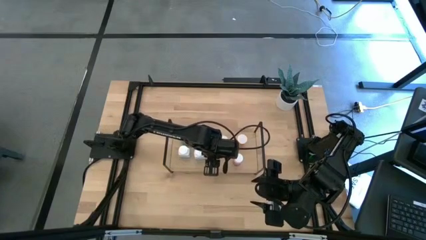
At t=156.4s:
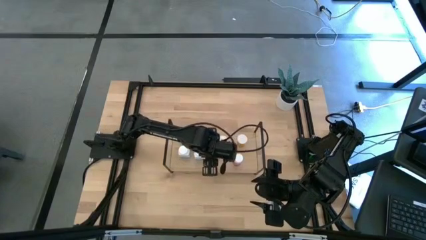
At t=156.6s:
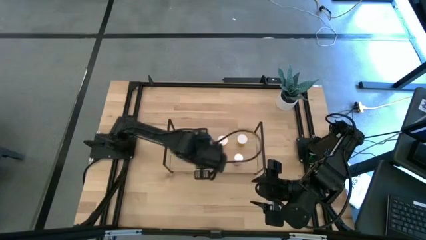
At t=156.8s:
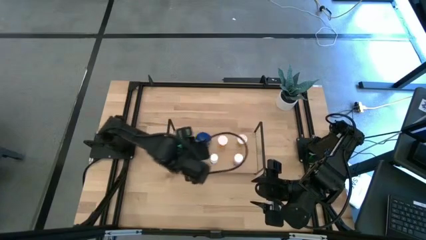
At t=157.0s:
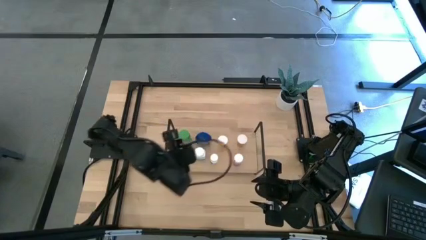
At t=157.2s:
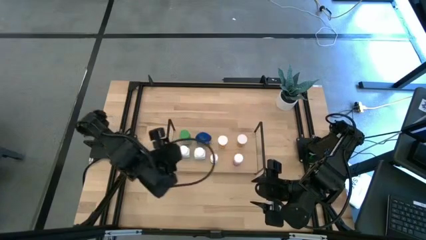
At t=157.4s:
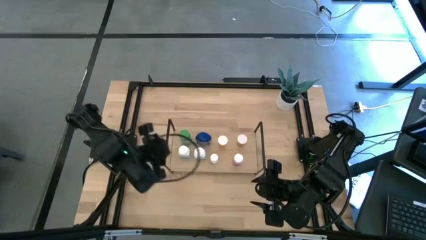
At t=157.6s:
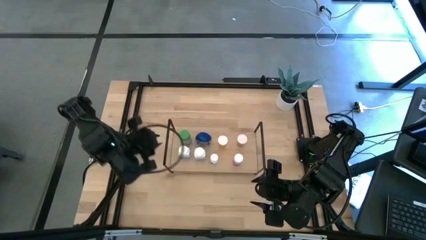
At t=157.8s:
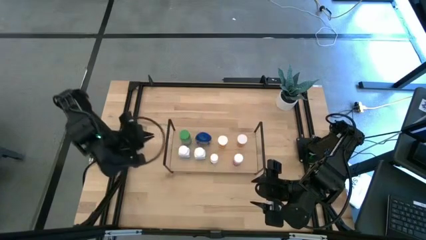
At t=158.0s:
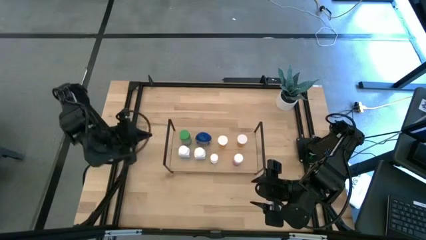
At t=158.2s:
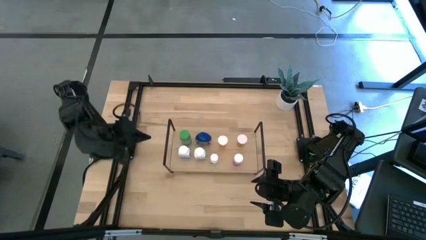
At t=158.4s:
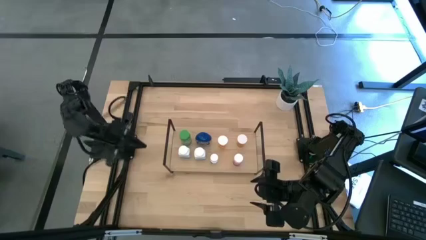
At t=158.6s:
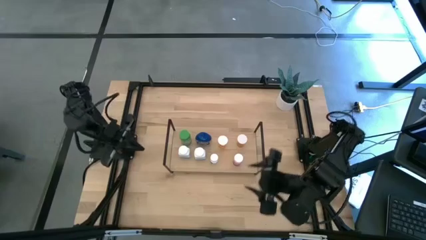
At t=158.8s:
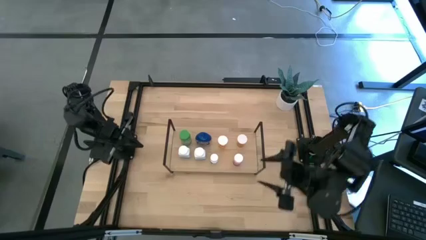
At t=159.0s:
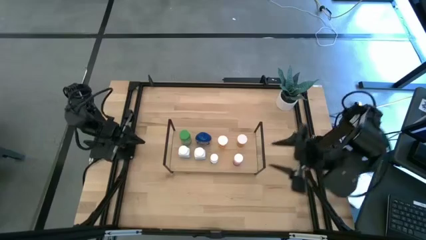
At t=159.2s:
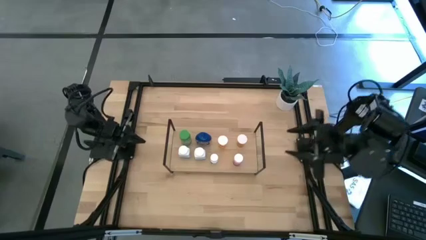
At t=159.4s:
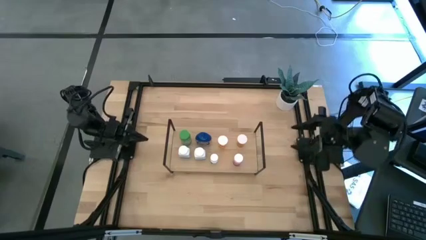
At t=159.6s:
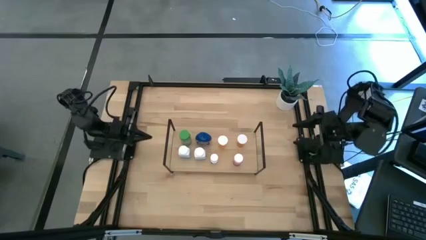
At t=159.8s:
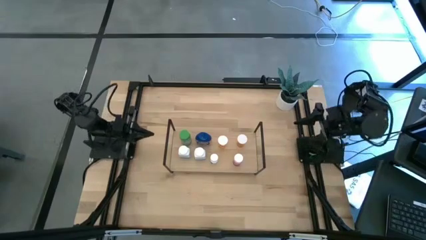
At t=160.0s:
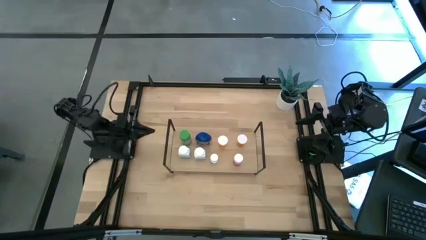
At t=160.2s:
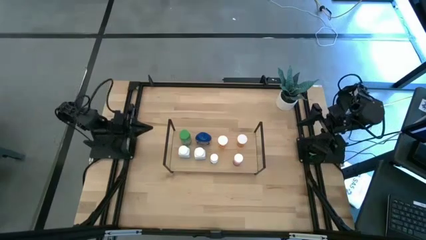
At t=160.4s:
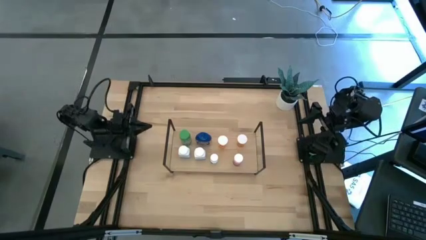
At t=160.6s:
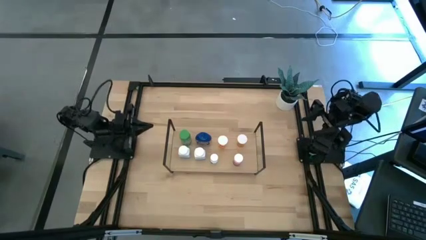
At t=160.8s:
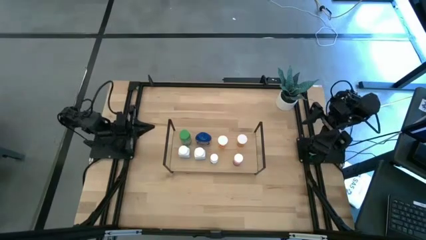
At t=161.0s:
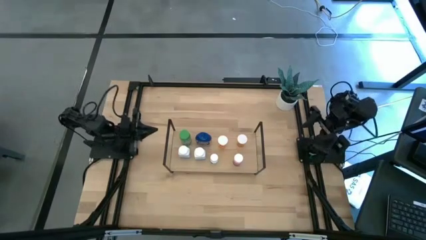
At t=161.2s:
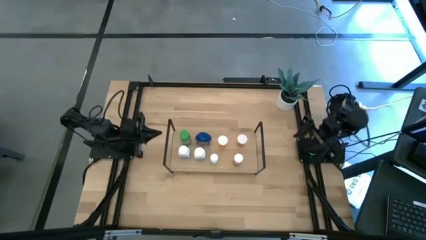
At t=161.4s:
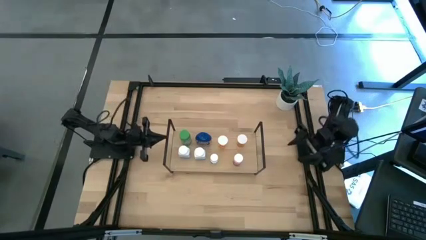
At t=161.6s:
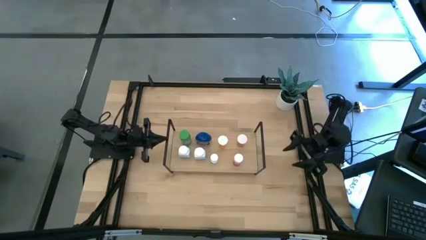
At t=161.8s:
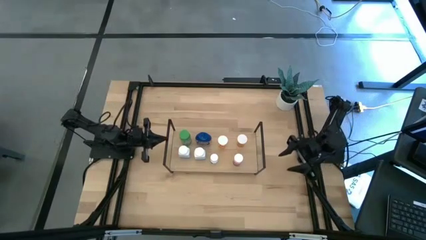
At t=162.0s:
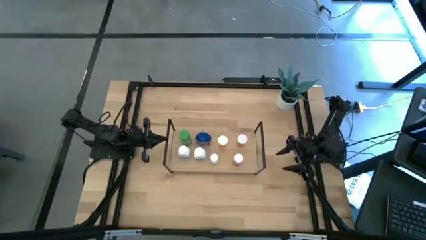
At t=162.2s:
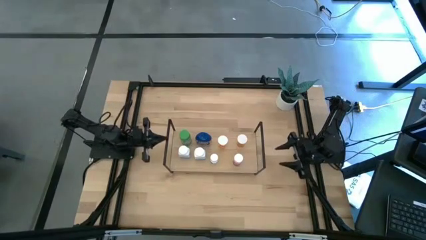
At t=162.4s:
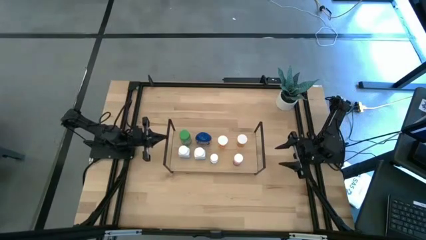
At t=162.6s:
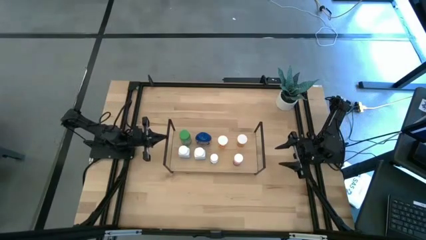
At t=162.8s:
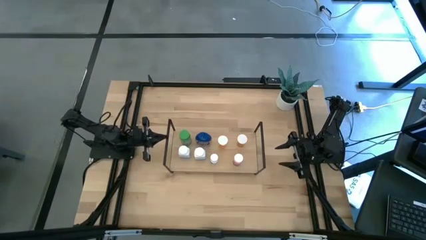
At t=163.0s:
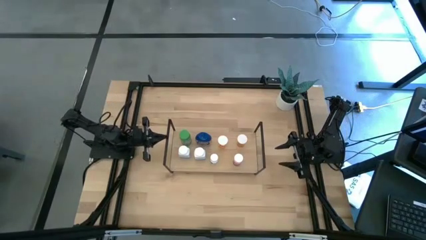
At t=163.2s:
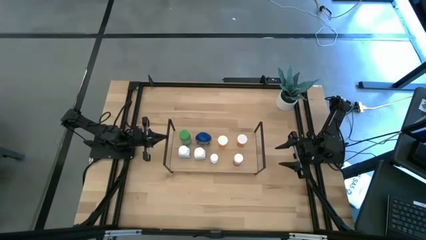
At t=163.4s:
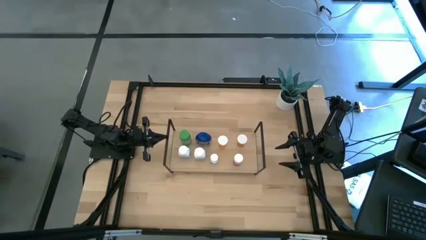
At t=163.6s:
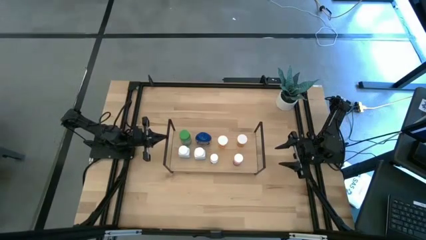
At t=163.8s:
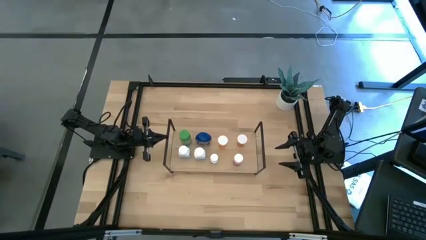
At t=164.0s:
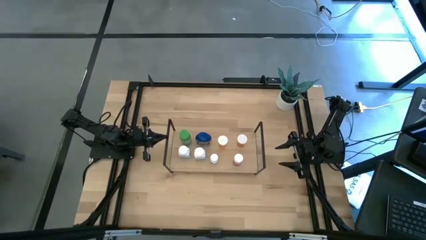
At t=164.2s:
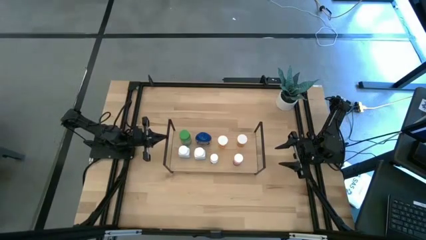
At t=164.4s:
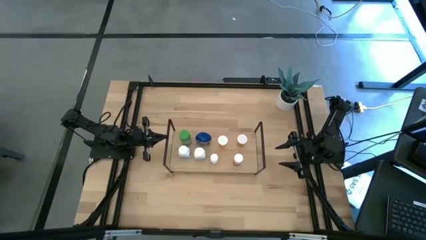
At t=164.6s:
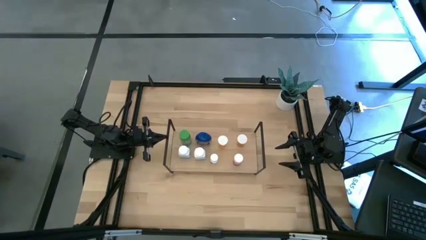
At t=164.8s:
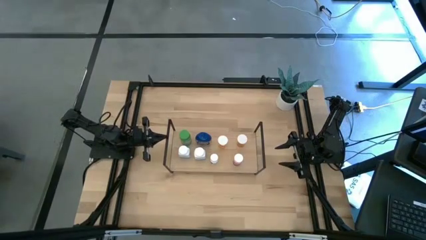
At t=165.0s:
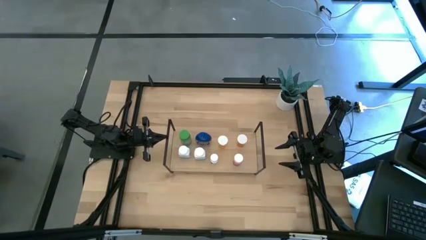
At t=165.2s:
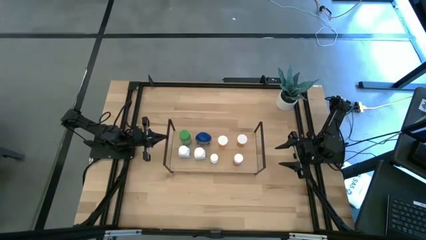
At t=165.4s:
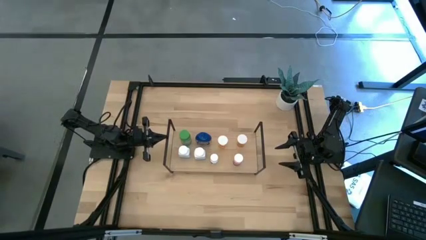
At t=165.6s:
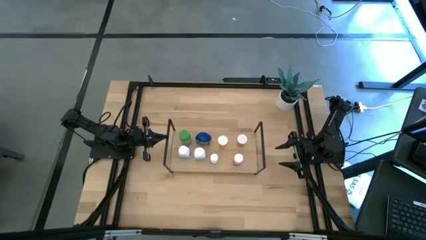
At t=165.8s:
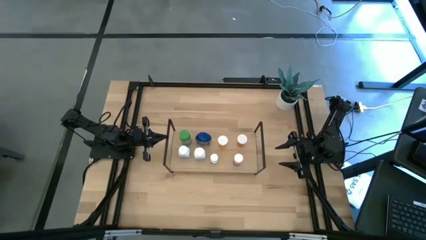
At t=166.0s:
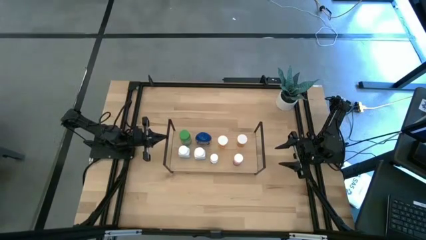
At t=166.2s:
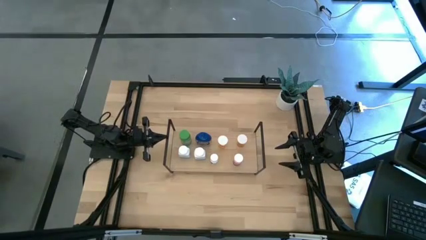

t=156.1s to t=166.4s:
Task: Pick and place medicine bottles onto shelf by color
Return to Home Position

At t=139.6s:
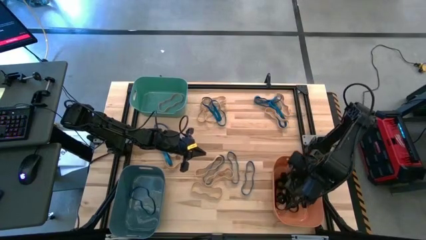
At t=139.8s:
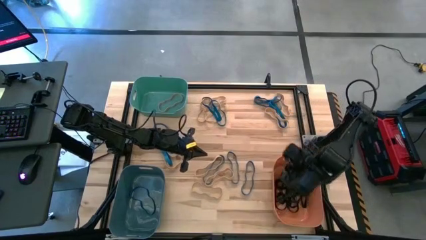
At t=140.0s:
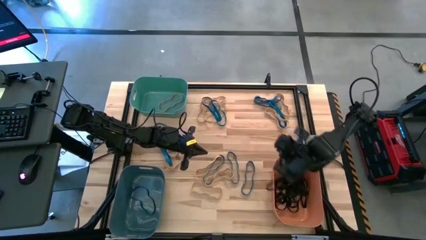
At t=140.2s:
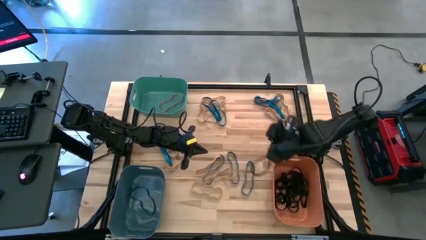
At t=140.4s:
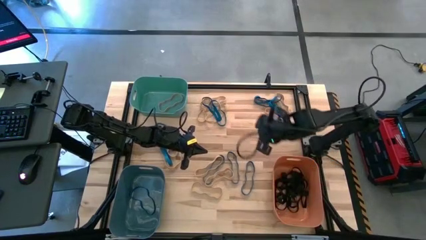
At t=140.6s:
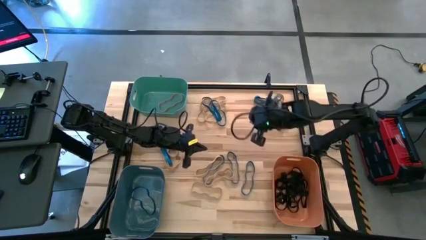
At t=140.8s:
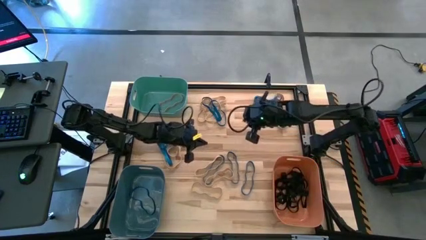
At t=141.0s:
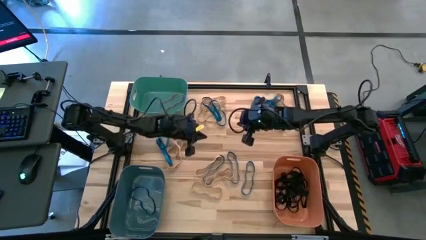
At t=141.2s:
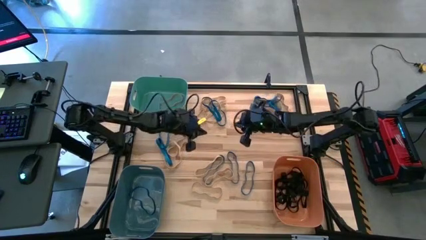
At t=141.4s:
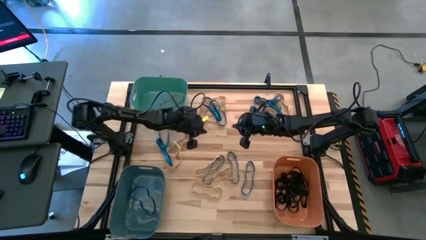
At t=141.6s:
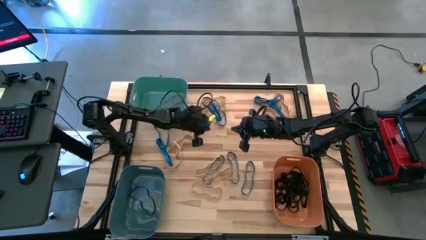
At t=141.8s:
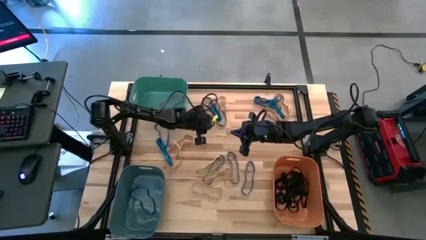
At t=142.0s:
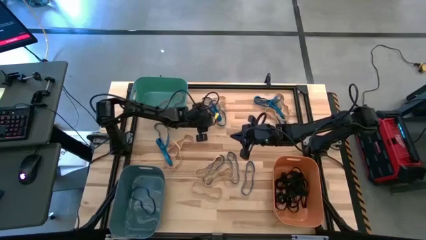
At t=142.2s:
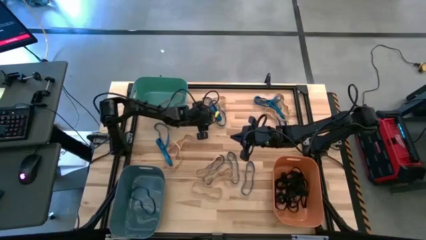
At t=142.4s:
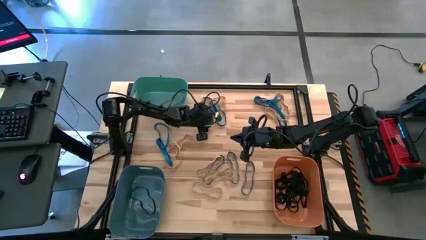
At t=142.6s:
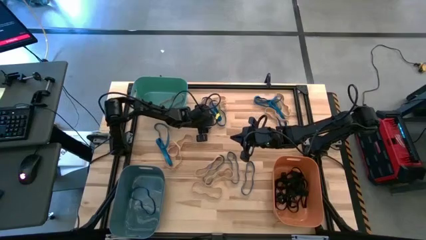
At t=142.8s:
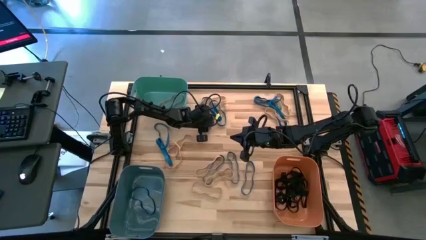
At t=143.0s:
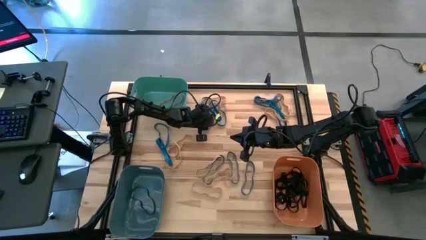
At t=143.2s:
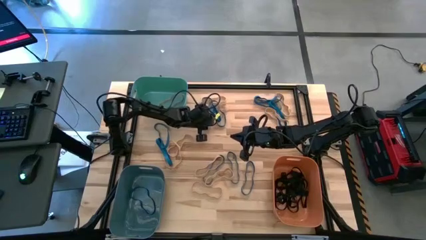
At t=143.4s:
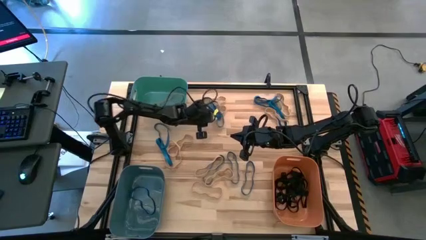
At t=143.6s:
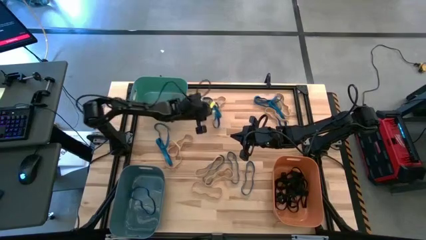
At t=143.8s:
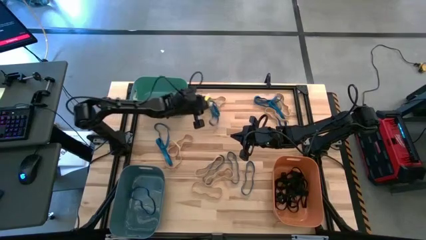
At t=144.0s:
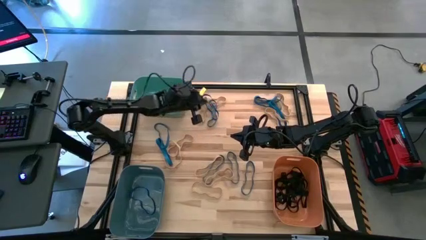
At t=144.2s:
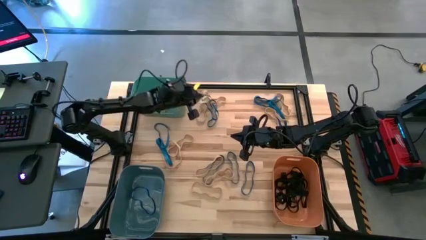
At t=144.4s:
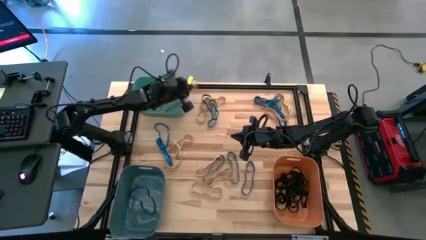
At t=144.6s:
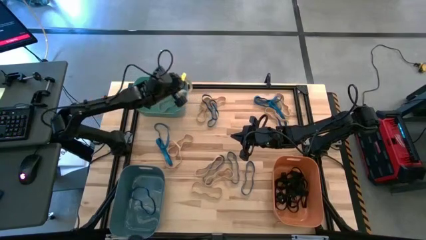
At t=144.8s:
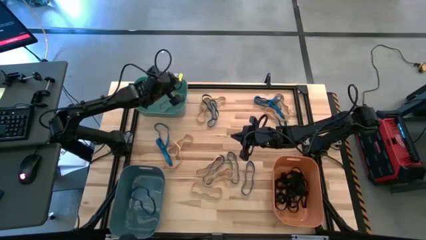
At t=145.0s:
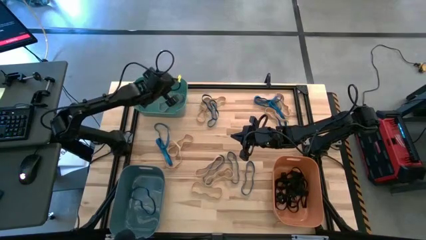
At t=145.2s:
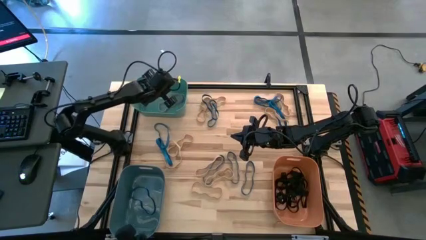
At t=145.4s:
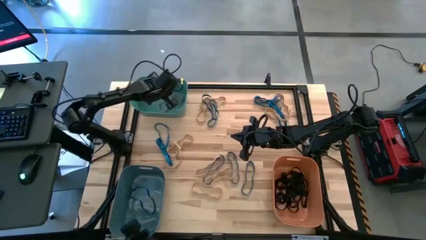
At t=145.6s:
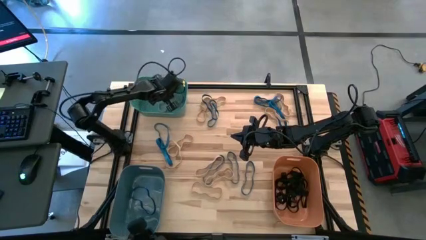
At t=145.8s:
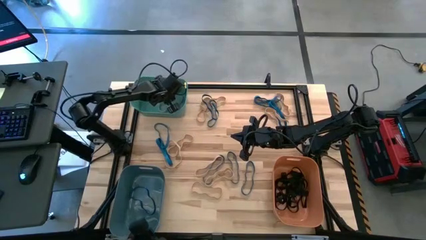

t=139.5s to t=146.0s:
Task: Sort rubber bands into baskets
Put the brown rubber band into the green bin
